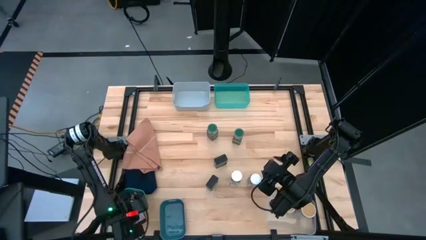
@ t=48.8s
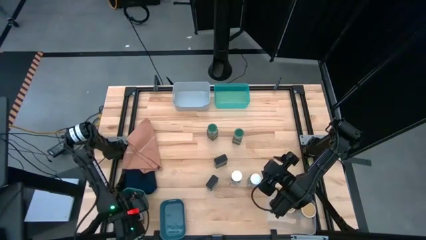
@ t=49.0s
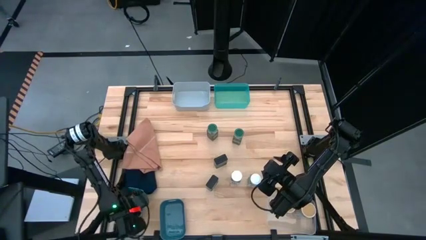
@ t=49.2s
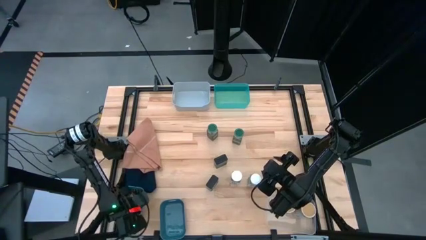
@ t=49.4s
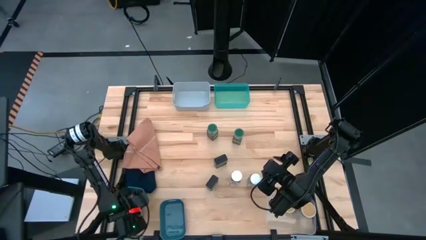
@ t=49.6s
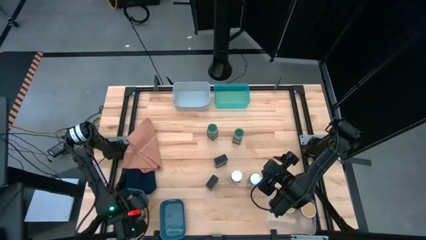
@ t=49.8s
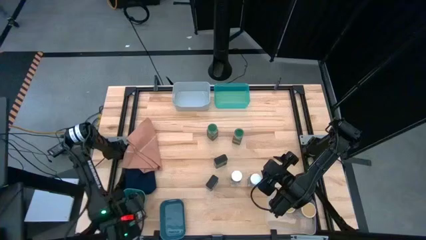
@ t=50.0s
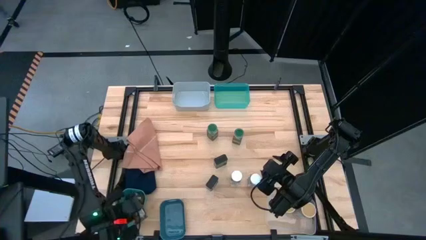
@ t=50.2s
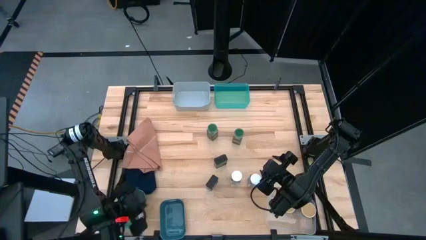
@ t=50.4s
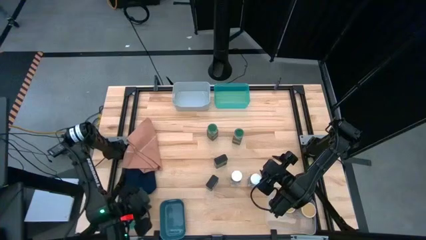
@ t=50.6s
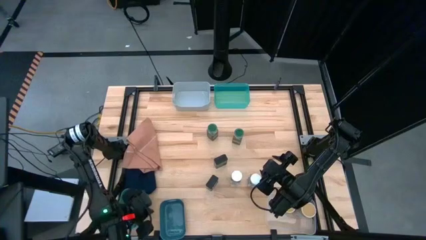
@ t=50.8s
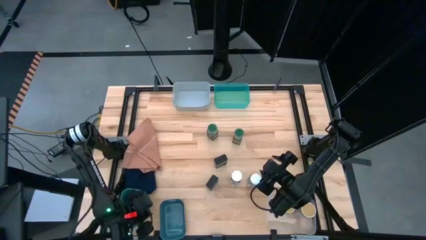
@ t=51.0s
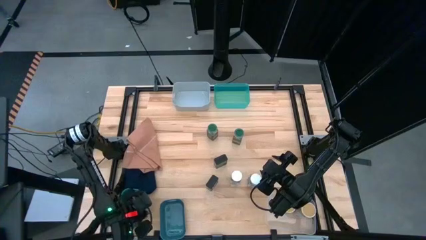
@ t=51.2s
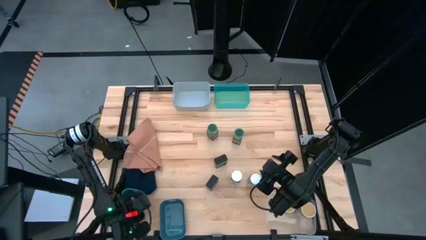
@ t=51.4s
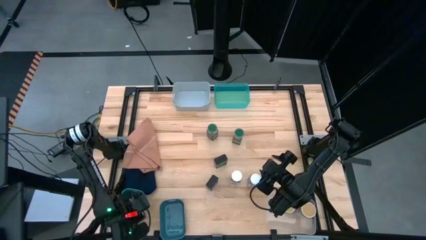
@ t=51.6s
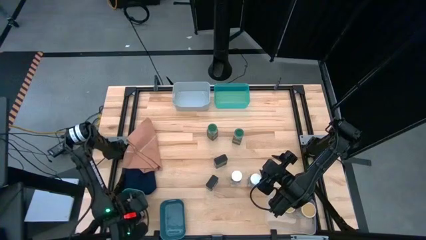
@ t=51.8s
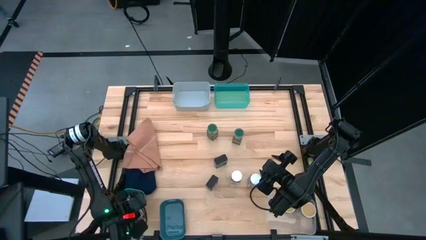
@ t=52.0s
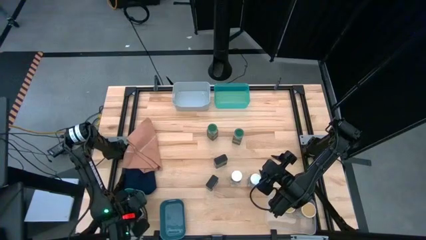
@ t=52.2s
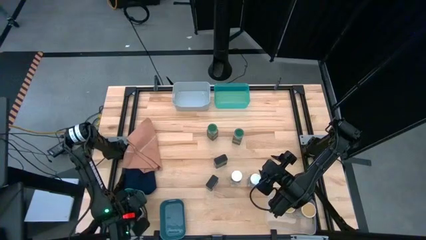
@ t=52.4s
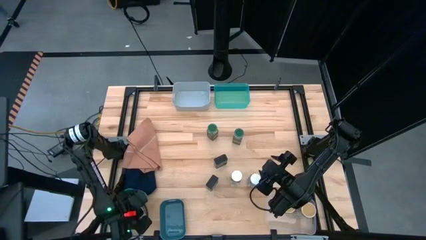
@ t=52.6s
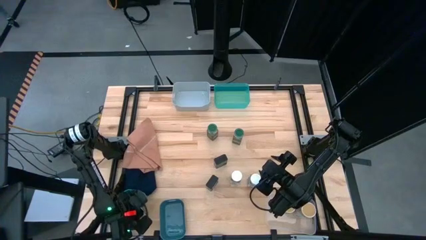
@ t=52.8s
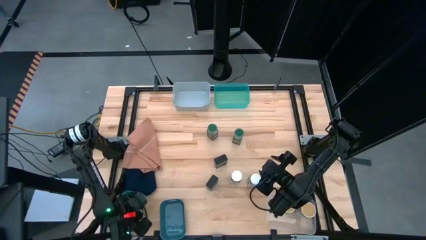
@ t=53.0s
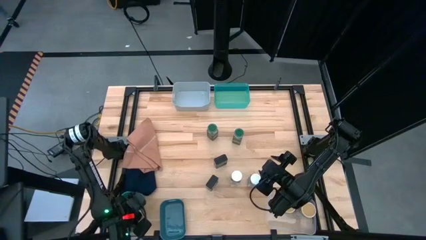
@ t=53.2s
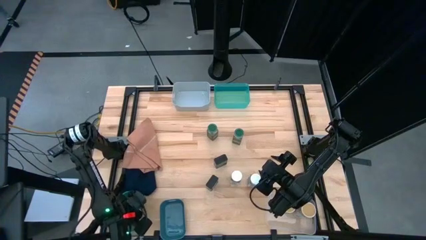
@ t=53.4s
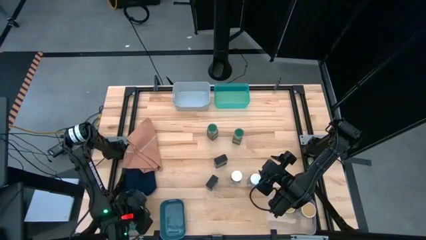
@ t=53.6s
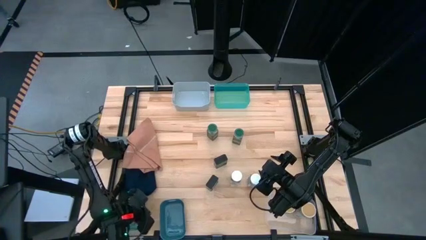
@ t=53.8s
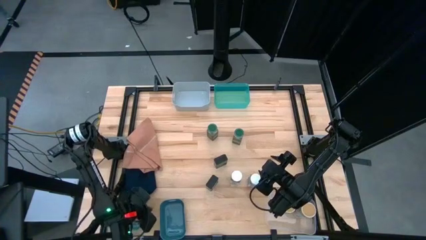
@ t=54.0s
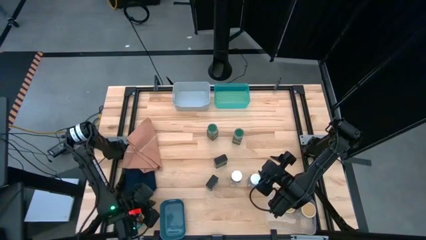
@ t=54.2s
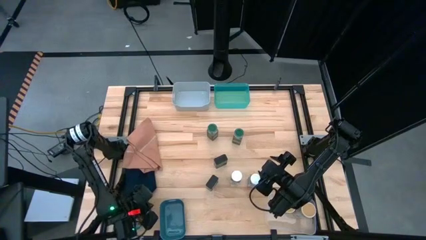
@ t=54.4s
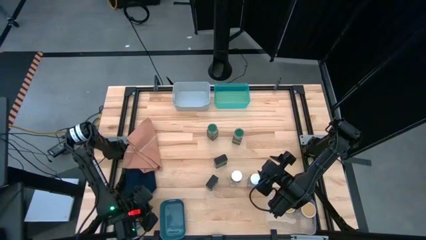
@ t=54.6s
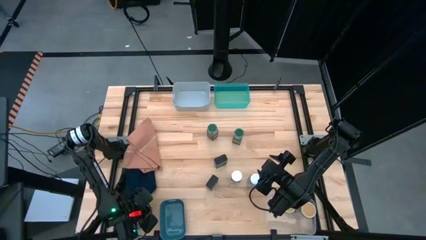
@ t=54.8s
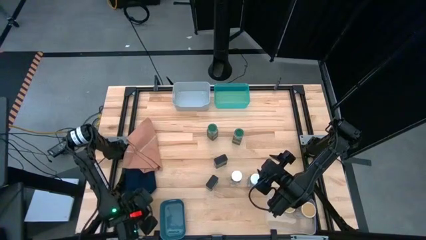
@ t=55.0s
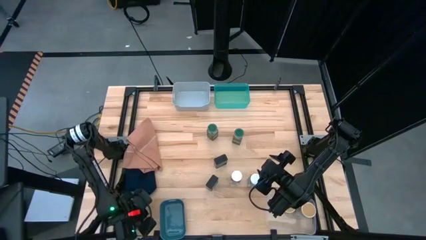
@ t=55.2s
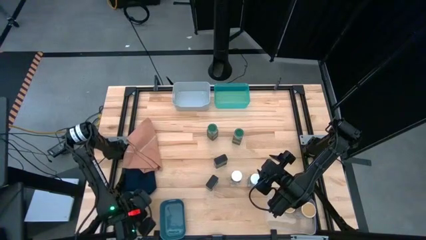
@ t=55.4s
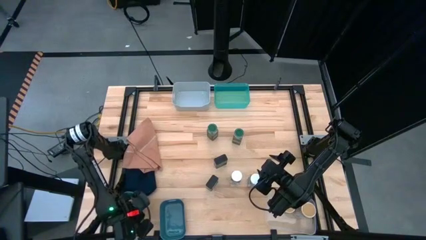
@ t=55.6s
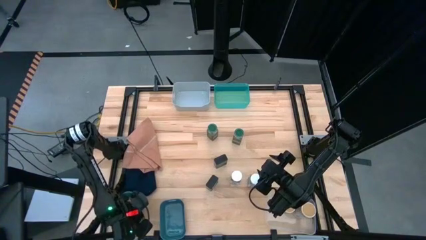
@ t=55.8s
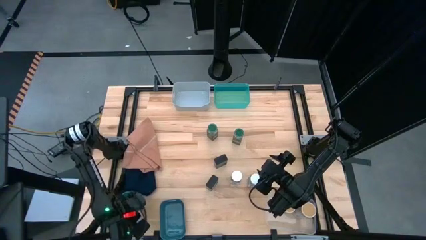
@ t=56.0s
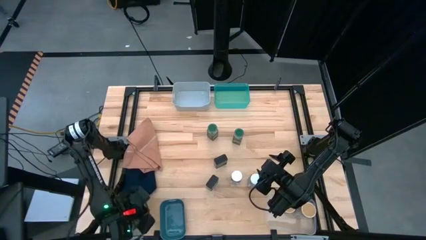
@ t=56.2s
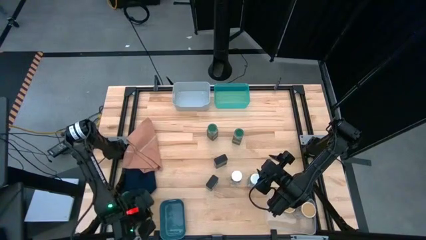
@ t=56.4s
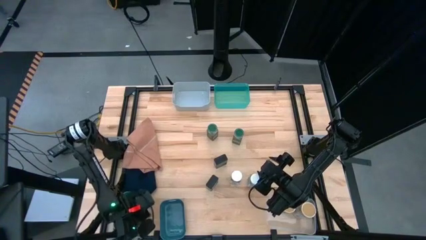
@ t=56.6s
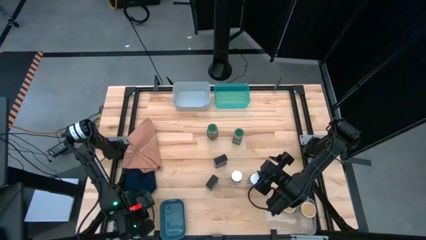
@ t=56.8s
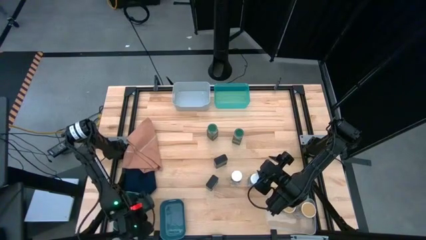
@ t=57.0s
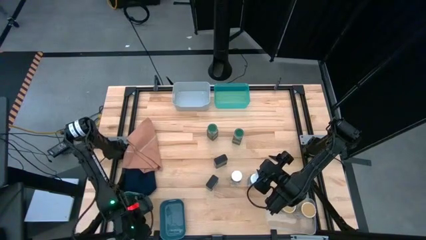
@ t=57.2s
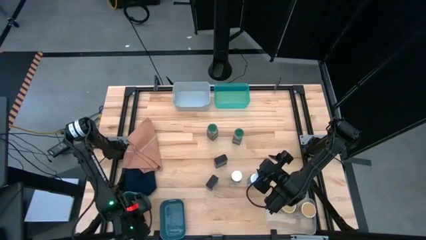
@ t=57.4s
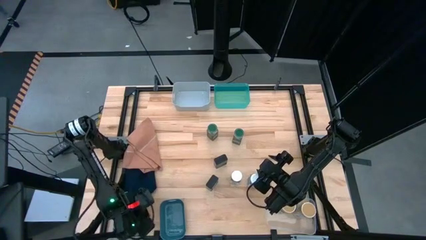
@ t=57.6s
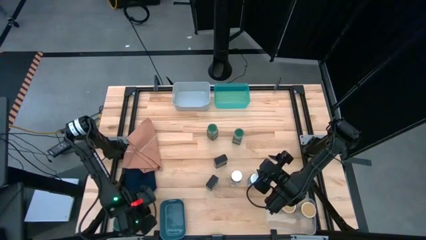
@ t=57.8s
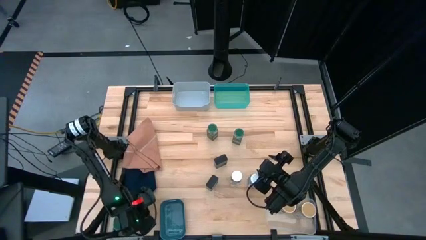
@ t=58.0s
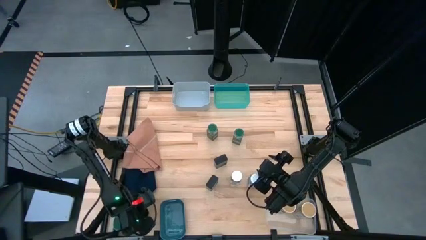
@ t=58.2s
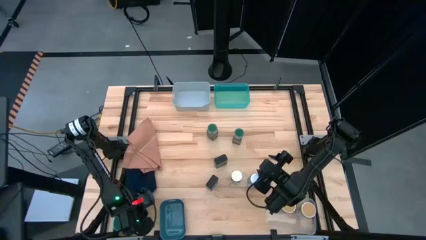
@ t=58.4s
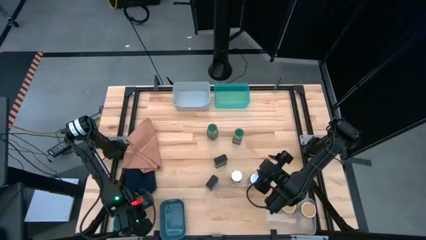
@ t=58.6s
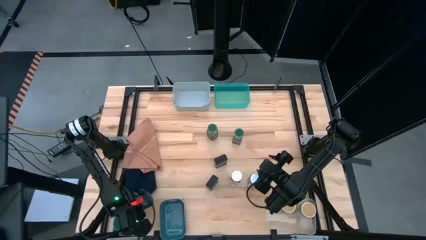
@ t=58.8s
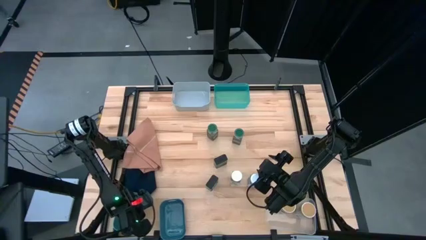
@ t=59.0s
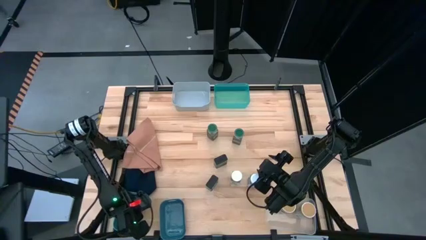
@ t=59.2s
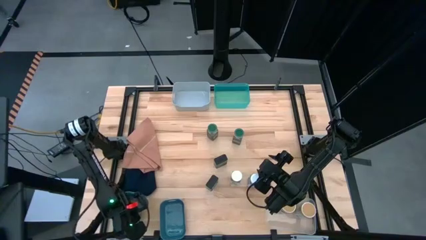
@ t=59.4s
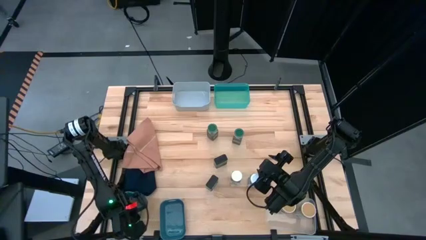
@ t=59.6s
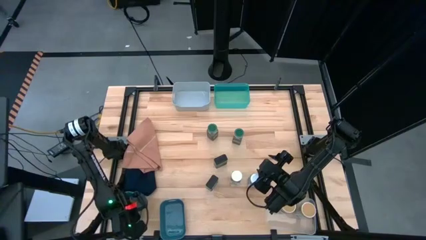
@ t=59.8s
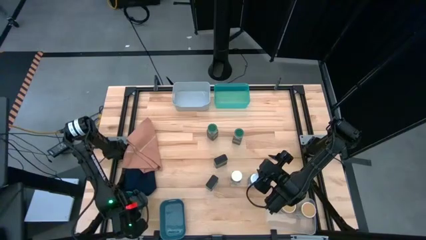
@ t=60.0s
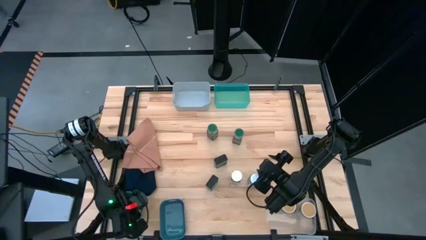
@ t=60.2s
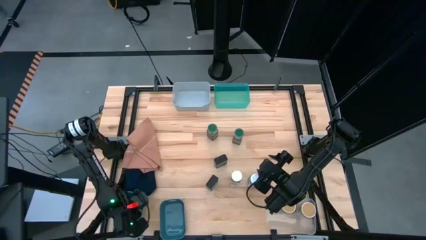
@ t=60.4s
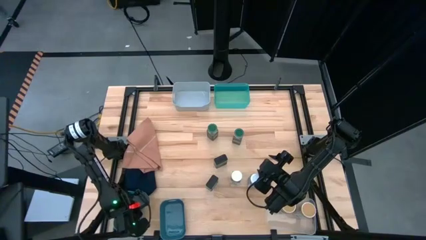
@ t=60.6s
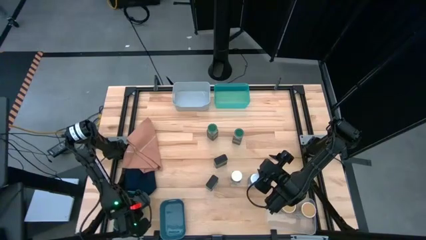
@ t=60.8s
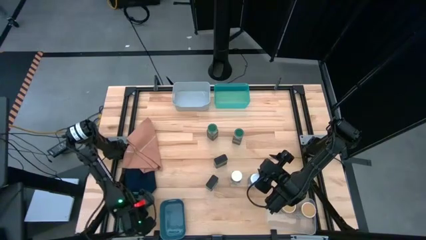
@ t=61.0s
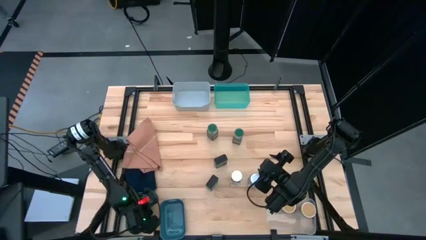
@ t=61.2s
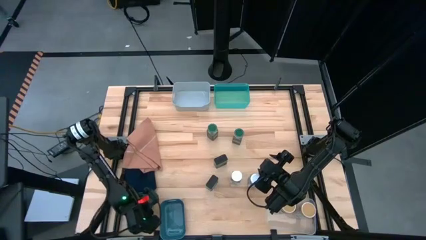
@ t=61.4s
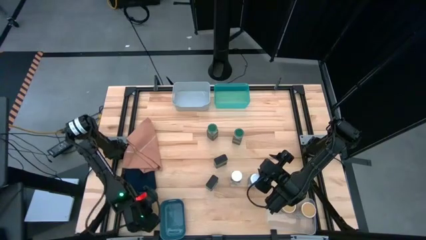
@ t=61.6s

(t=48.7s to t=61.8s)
Task: Sort spices by type
Put the orange spice pack into the green bin
